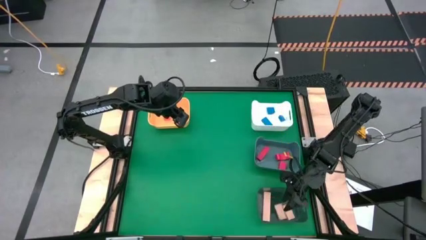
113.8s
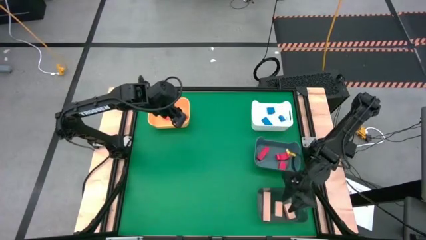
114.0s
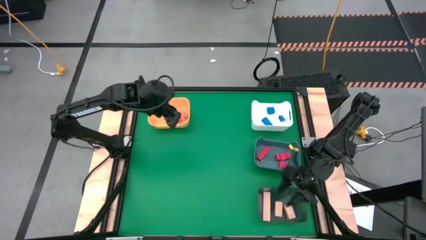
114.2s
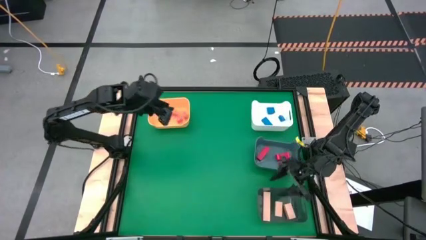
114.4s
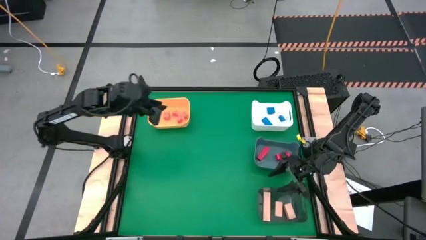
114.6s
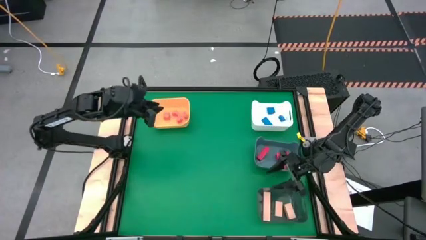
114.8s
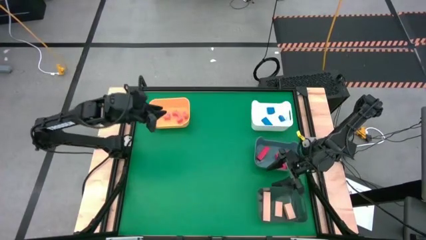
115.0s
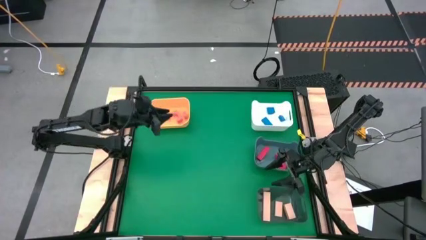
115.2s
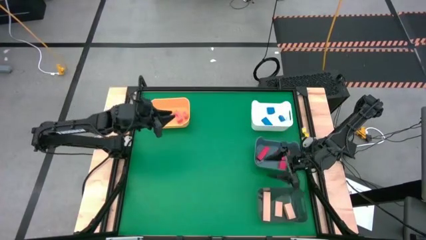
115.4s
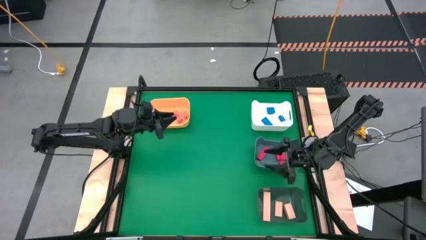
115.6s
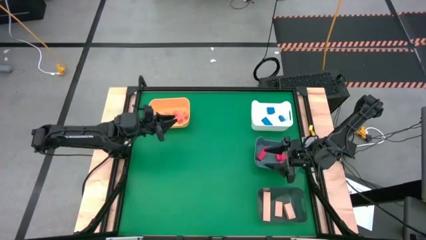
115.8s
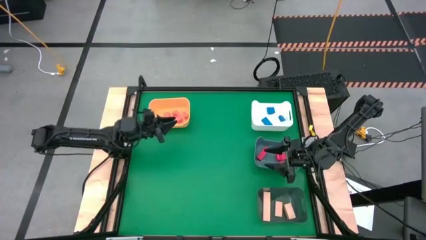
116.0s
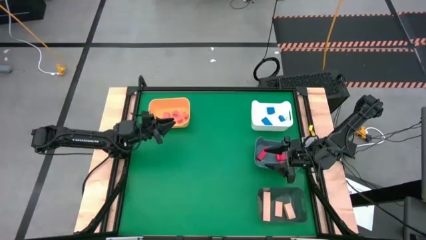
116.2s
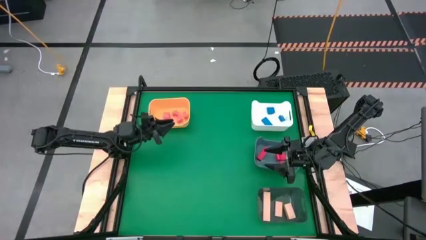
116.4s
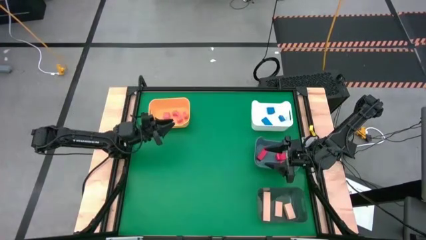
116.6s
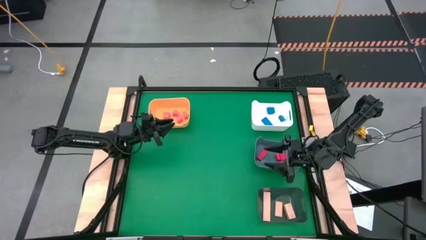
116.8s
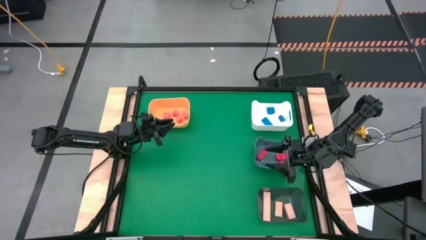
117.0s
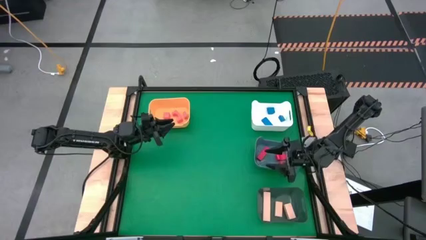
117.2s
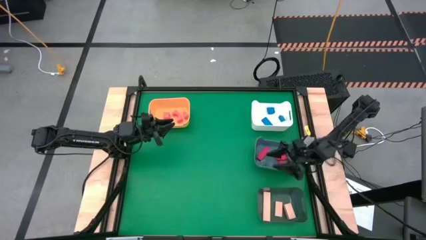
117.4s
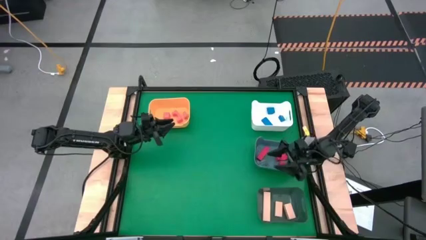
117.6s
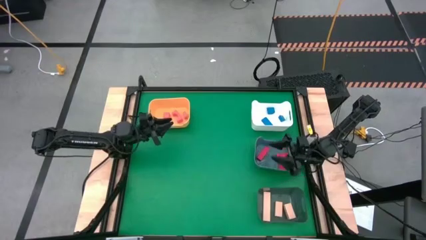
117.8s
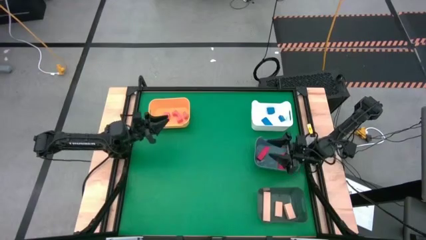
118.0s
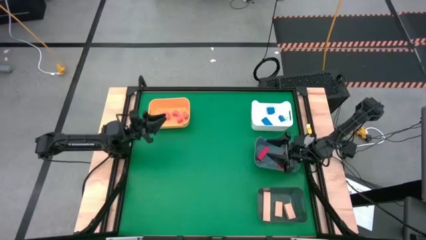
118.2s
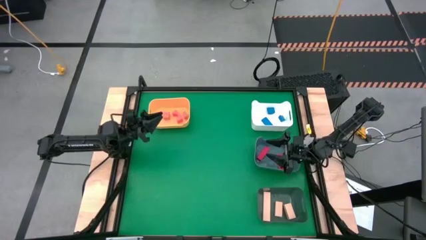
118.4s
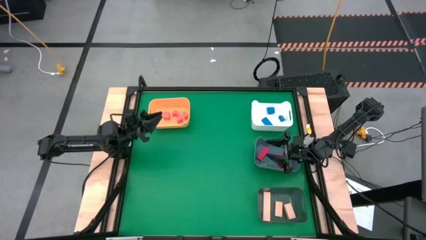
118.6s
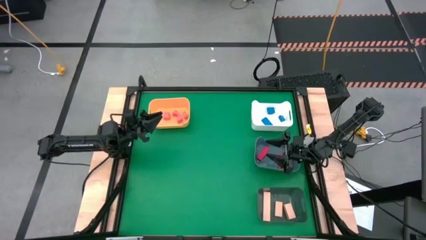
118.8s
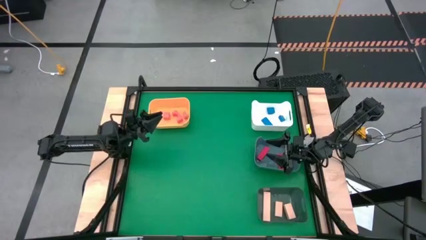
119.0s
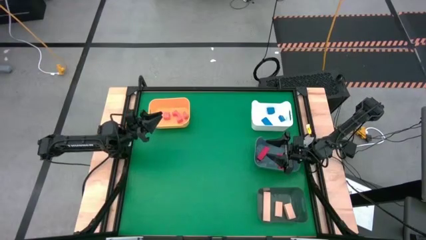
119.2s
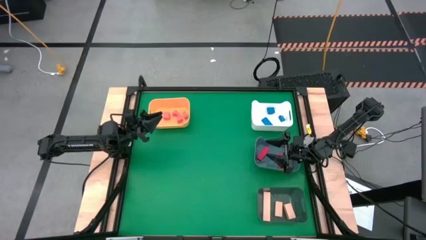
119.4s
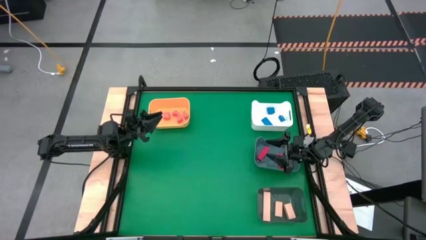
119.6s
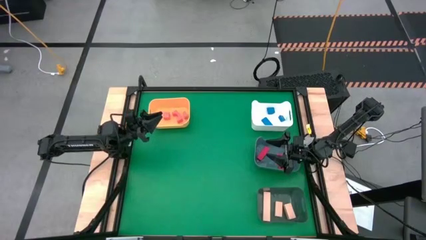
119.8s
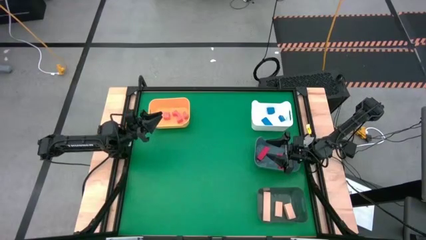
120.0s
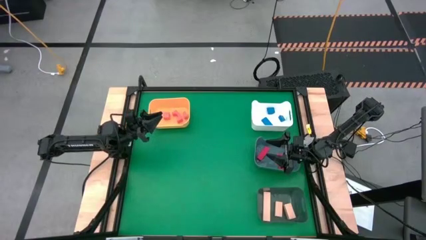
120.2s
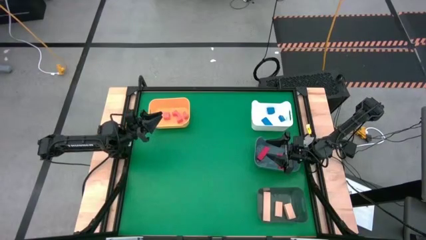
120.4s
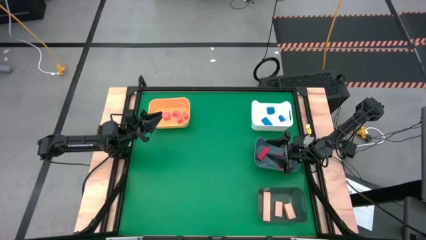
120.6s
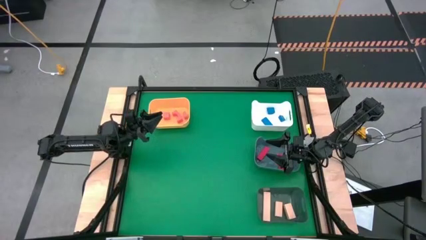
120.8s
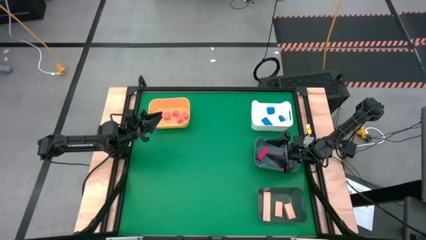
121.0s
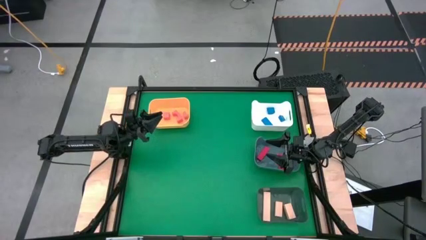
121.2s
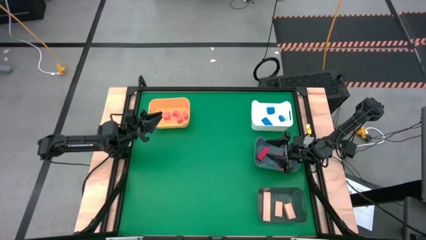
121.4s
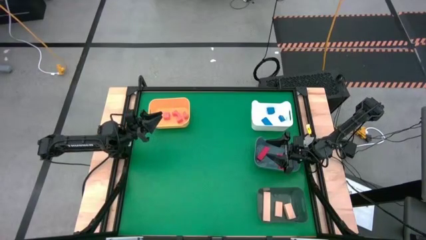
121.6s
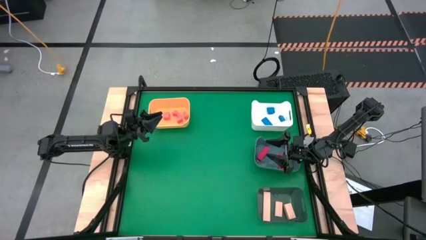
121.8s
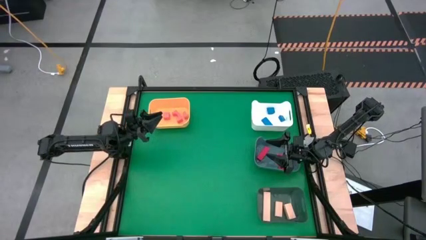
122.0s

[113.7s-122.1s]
Task: Sort & place blocks by color
Return to Home Position

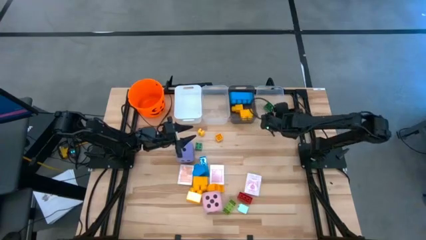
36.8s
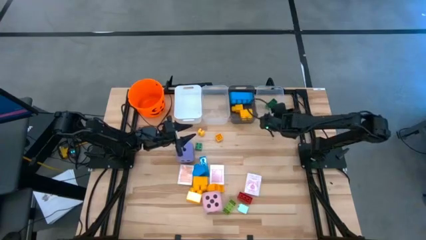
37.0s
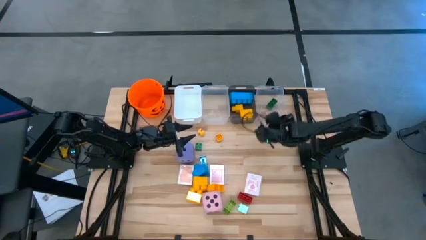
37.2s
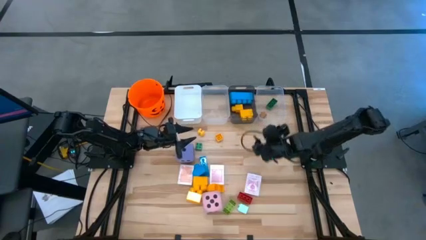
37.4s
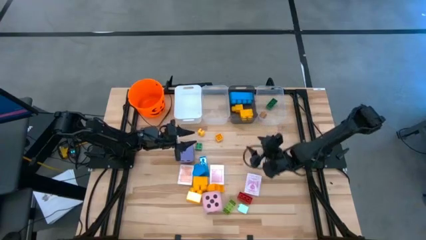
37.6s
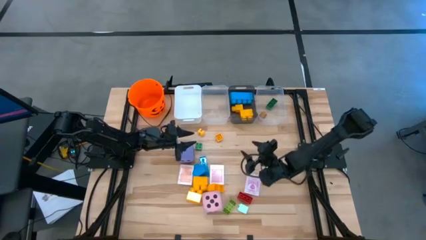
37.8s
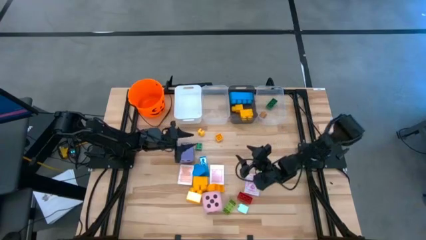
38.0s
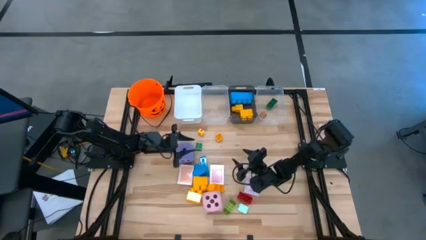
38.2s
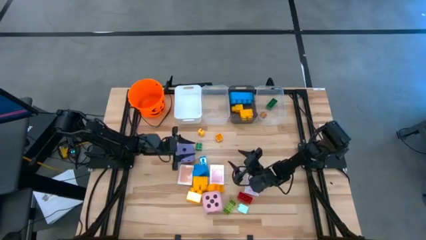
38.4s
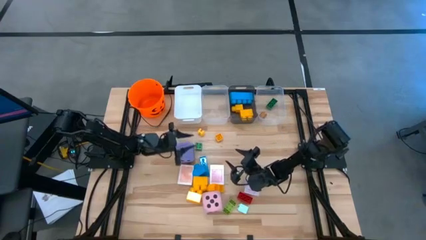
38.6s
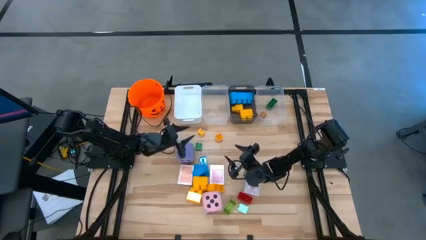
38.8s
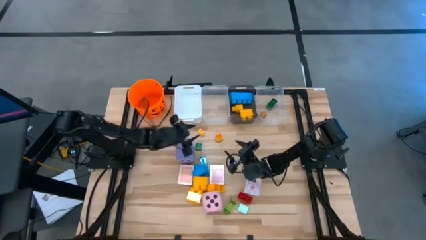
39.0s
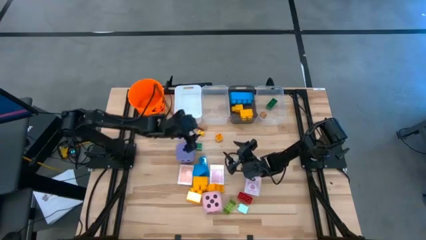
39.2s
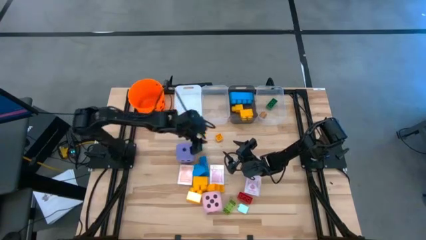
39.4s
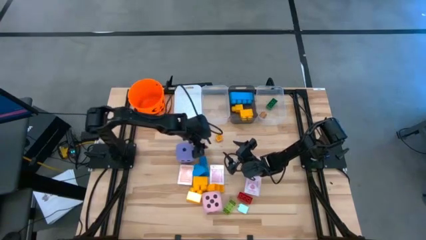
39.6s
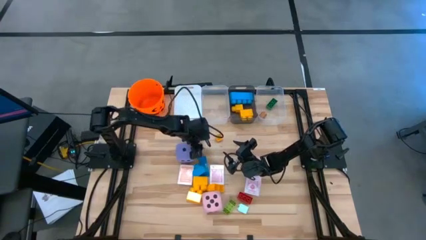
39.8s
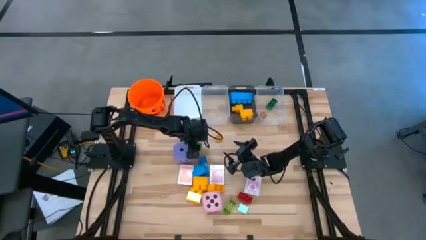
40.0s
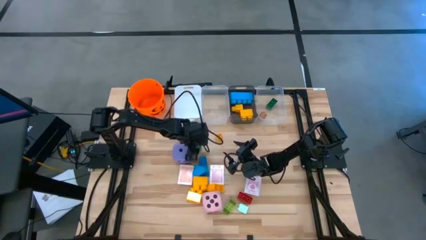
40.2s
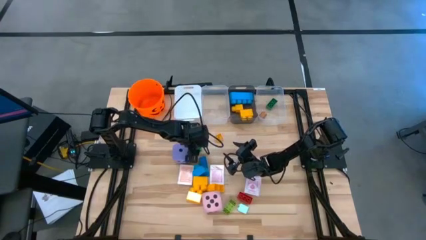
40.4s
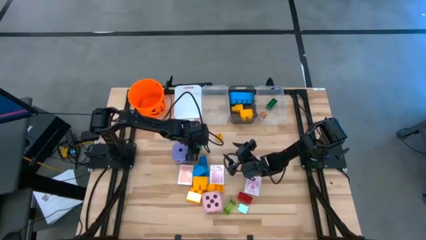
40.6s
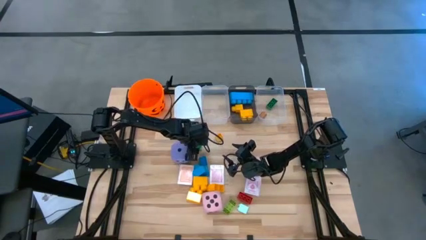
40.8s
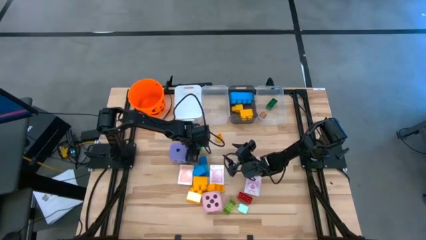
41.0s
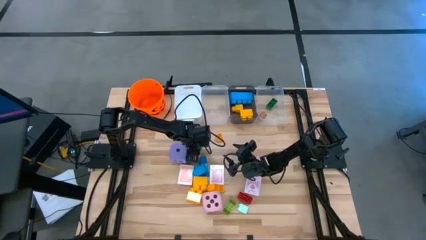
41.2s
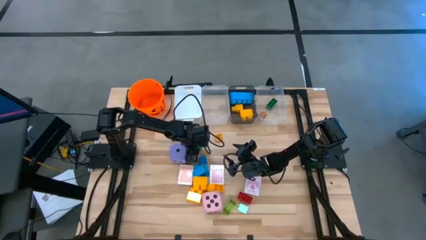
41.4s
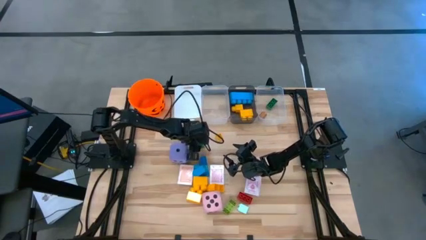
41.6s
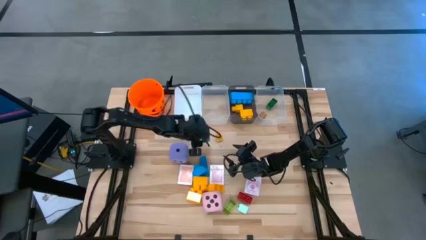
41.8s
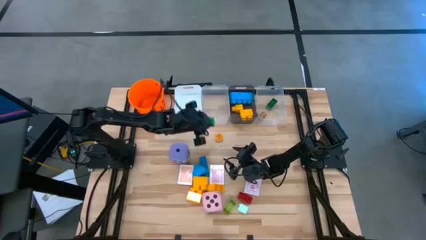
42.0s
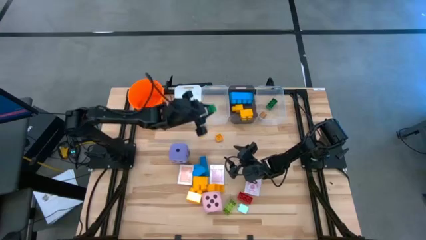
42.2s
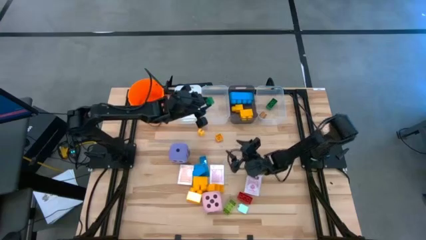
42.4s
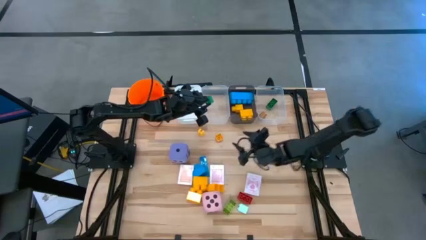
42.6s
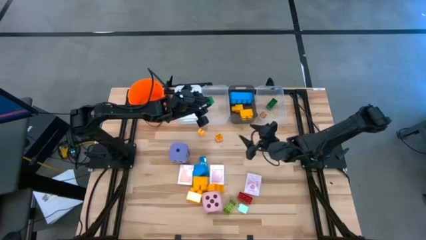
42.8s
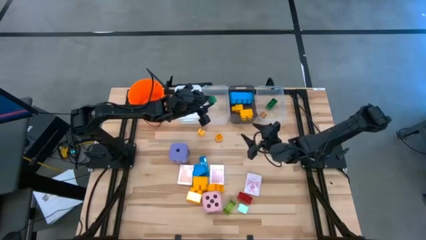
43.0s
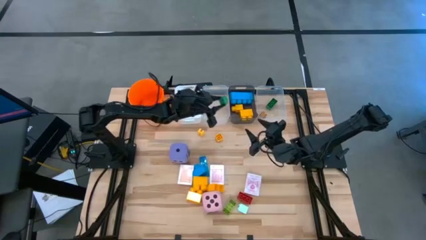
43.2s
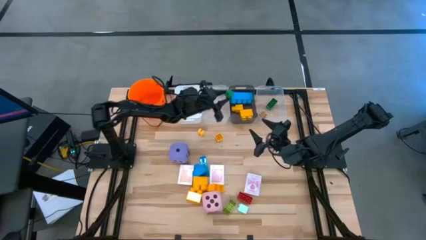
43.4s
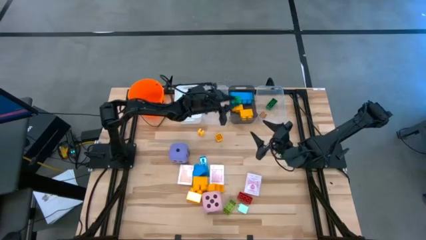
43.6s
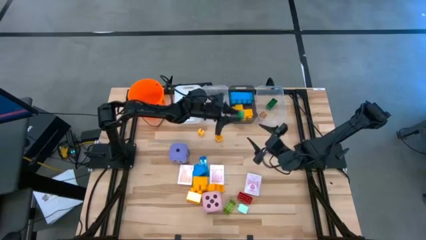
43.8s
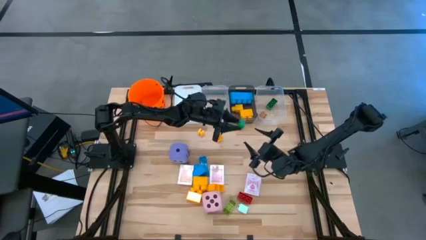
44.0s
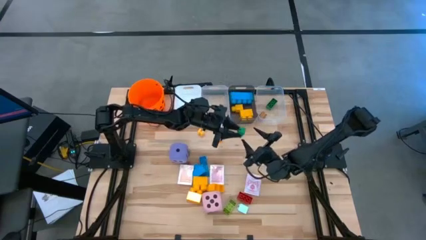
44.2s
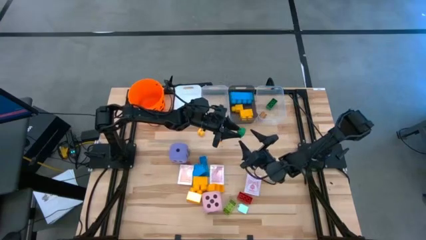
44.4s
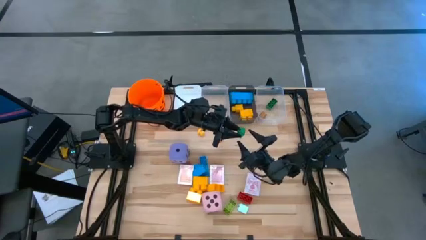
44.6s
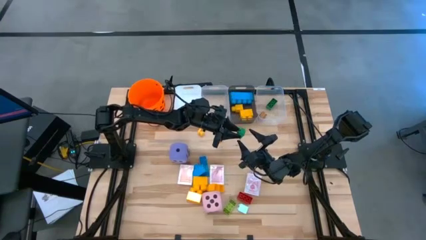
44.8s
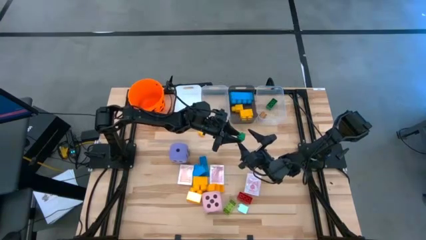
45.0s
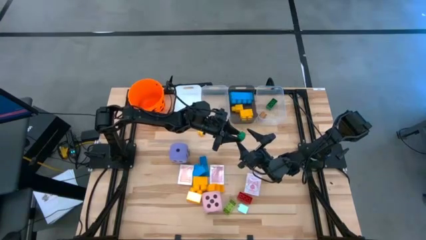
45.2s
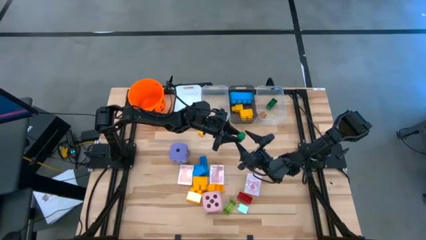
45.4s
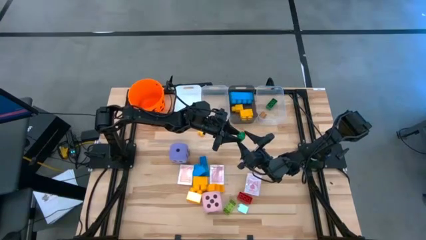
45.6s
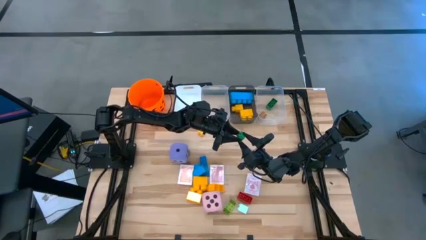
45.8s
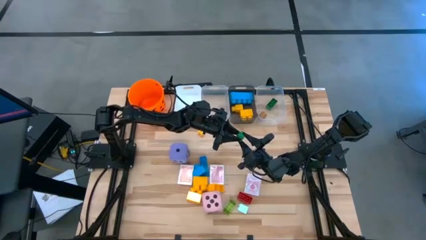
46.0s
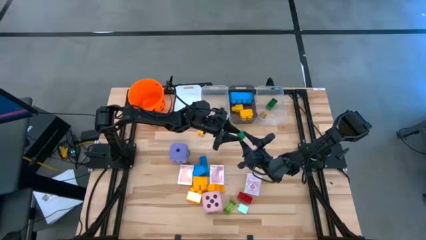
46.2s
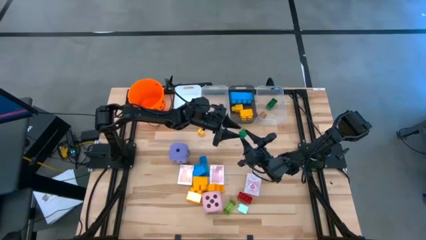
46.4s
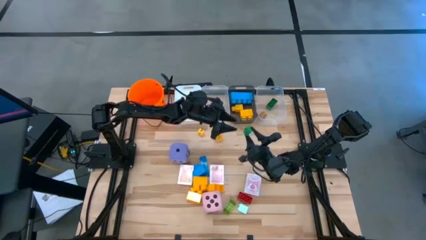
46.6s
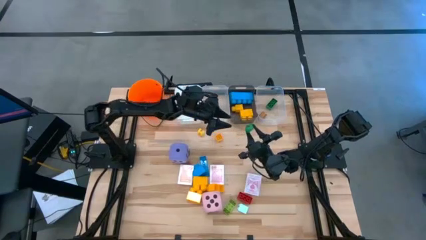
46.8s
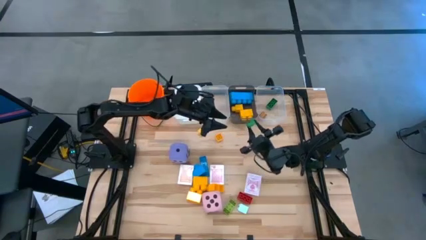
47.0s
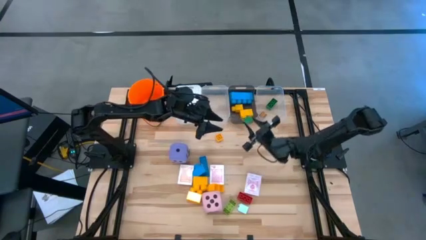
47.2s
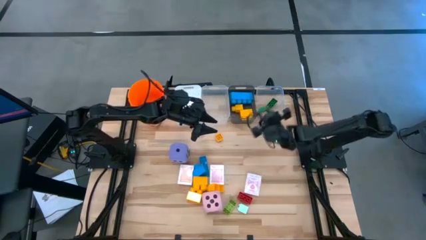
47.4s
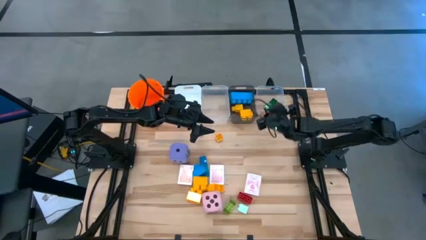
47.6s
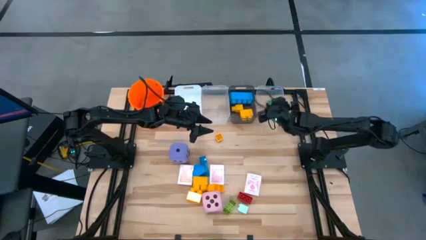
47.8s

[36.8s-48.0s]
Task: Pick & Place Toys
Put the small green game piece into the right transparent bin
